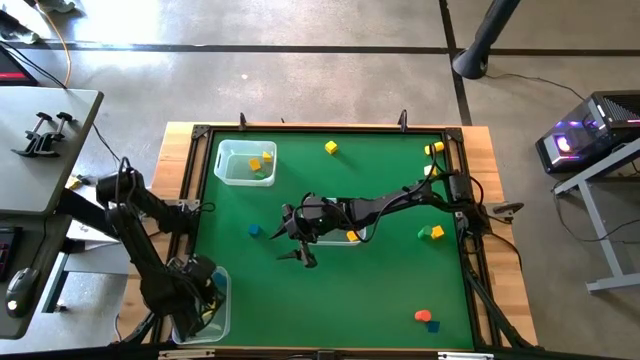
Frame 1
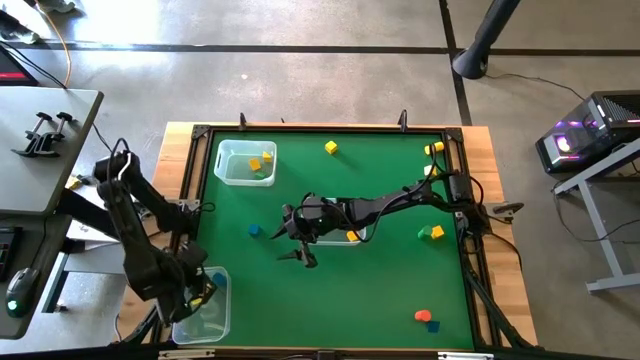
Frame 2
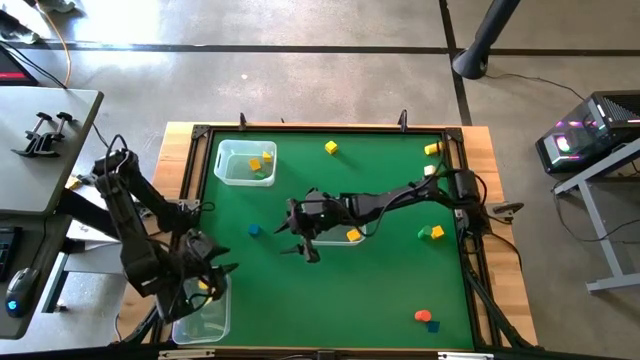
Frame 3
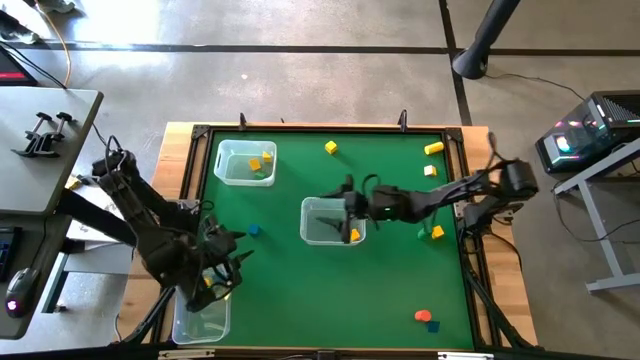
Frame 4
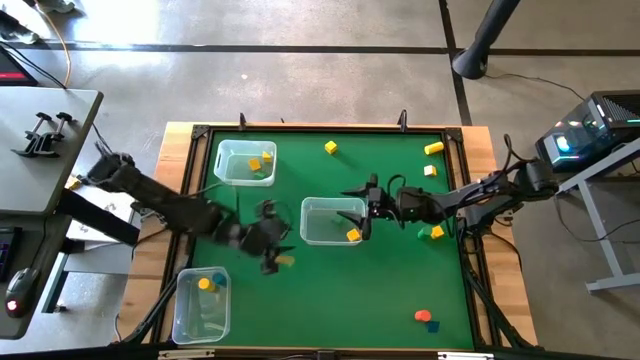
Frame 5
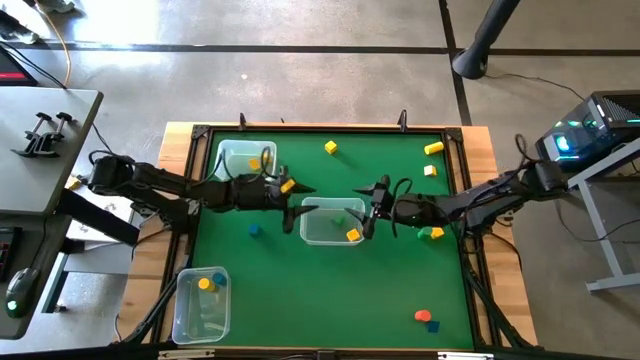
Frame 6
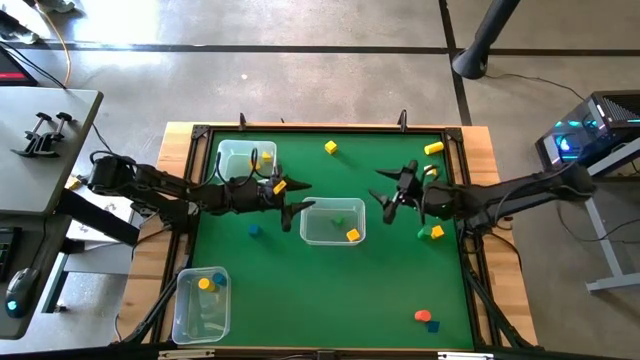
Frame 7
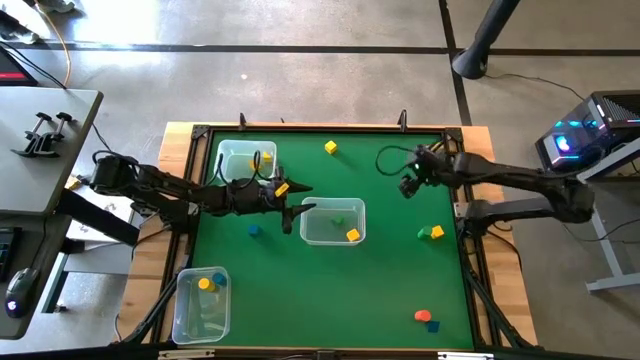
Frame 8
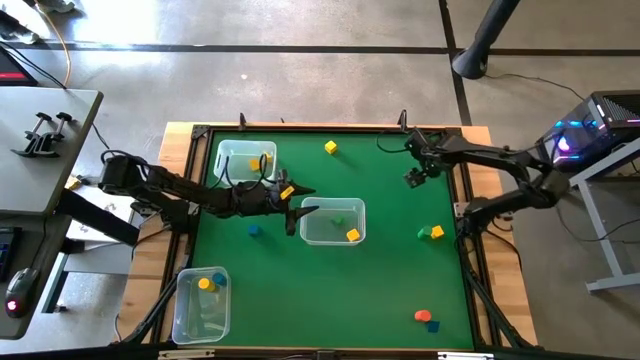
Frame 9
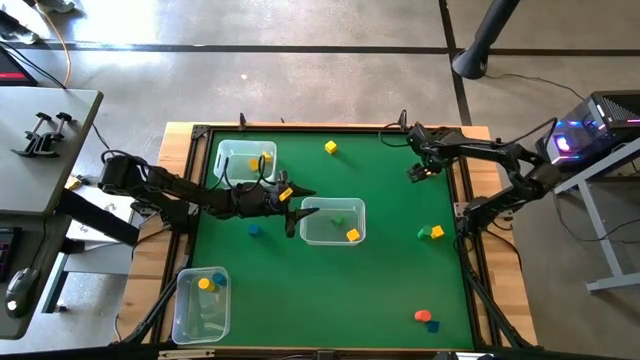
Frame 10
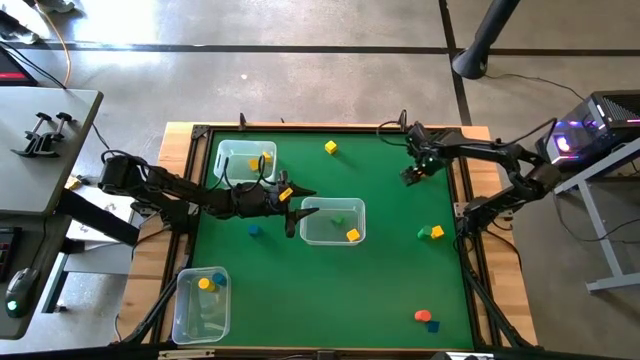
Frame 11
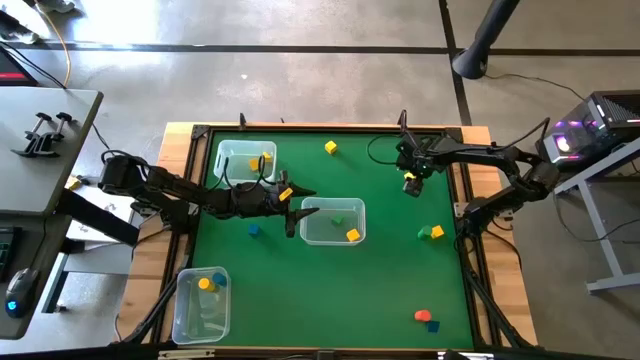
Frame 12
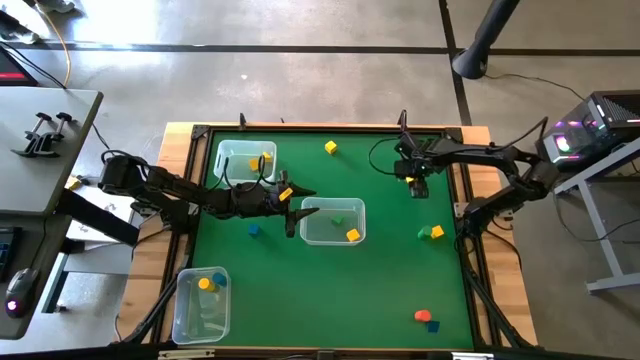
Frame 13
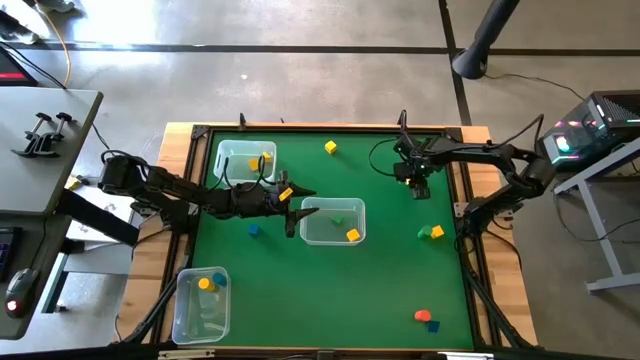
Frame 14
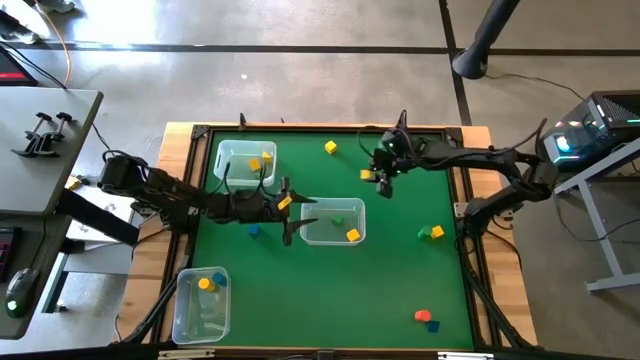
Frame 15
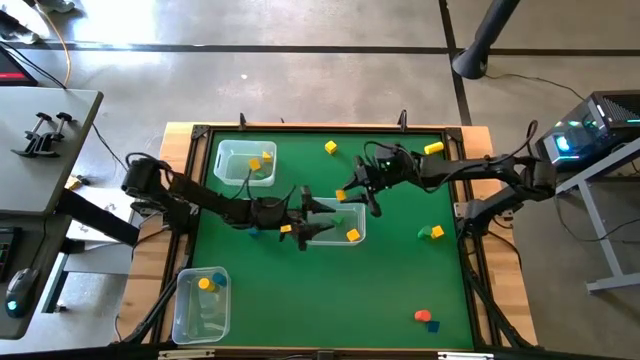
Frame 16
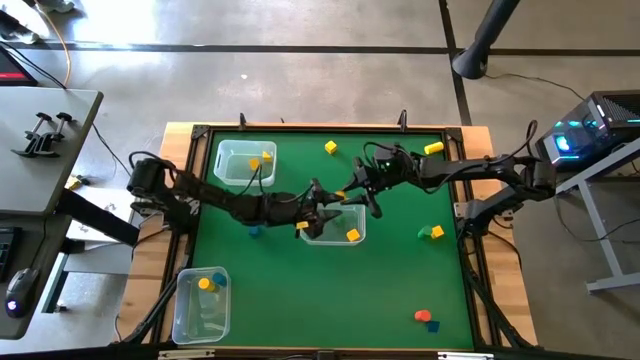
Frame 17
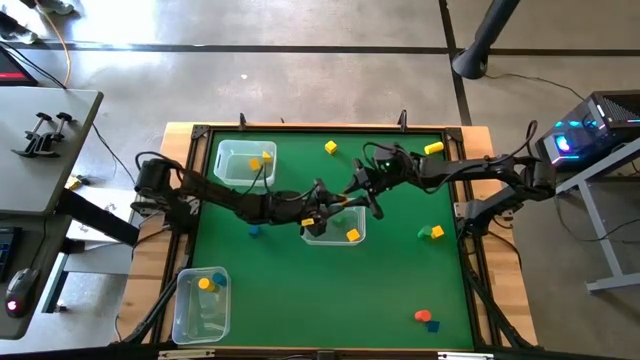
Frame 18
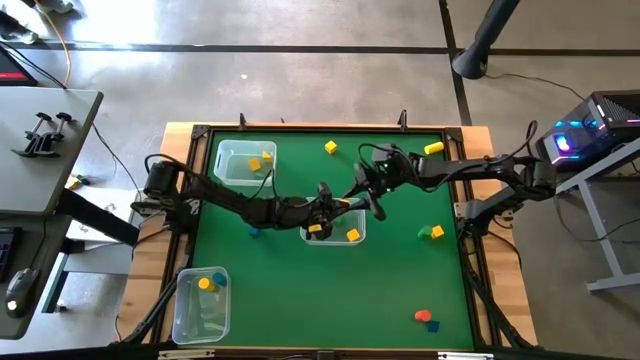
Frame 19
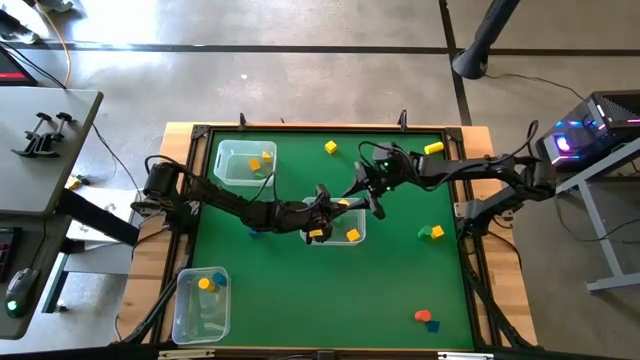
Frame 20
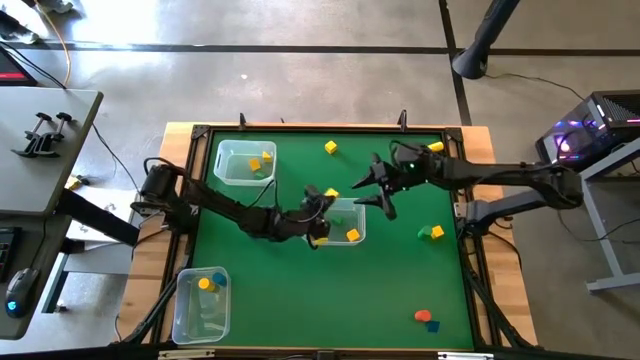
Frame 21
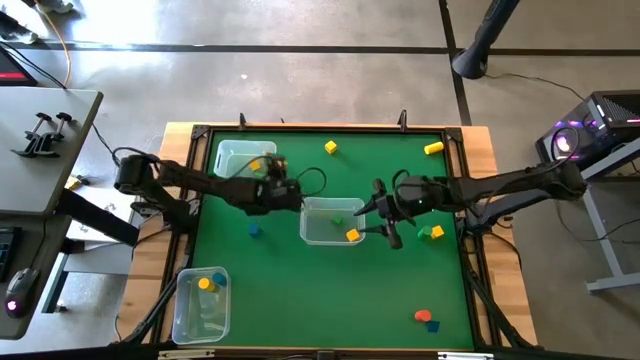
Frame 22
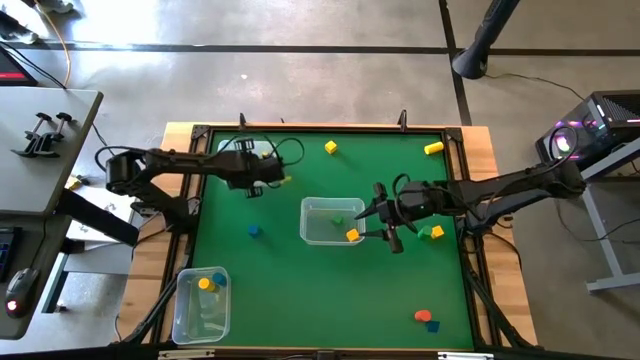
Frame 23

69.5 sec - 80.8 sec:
Task: Sort blocks by size
Put the yellow triangular block into the top left transparent bin

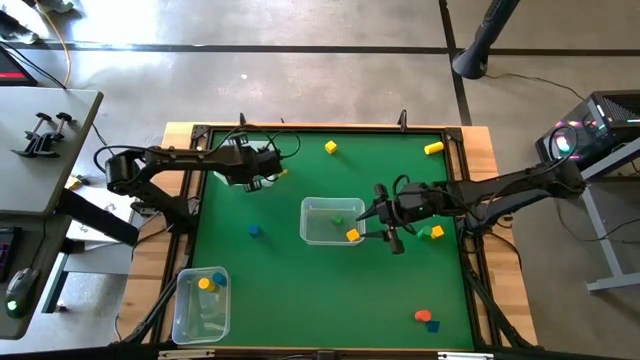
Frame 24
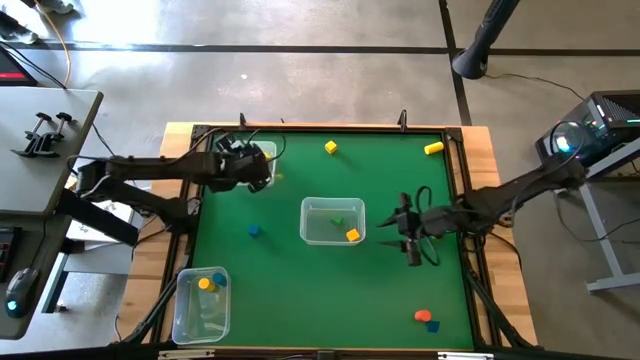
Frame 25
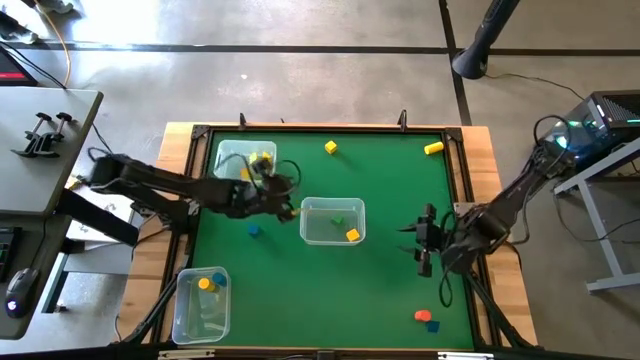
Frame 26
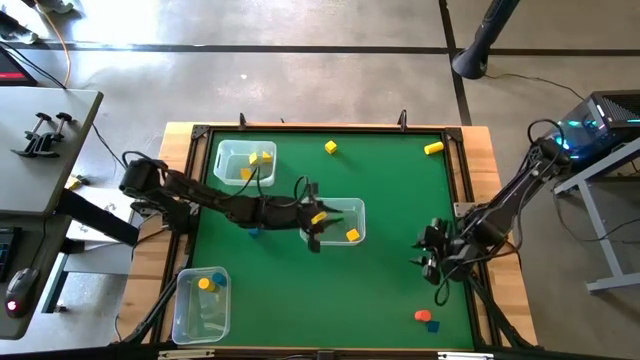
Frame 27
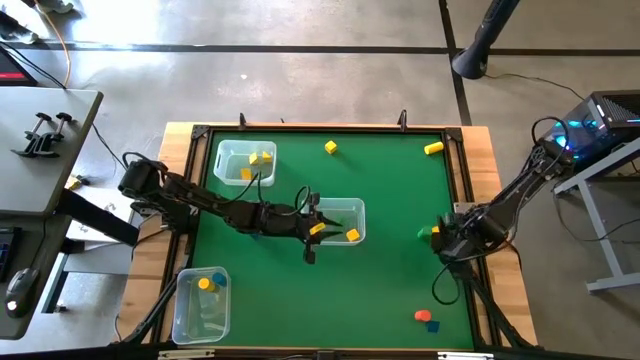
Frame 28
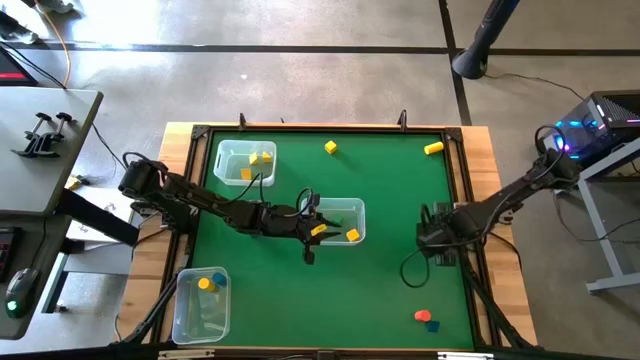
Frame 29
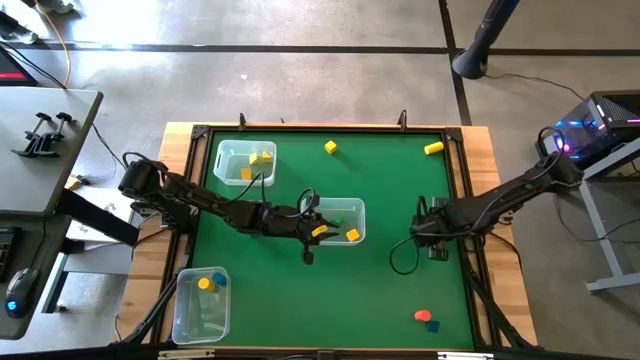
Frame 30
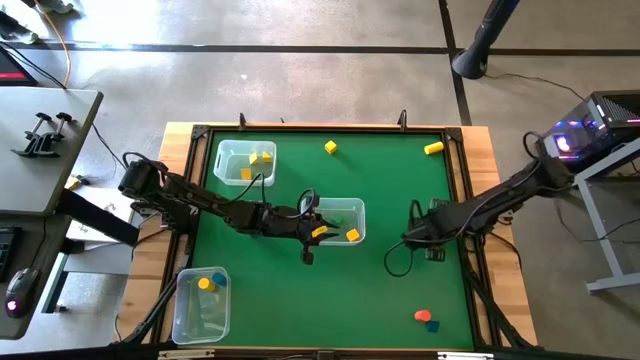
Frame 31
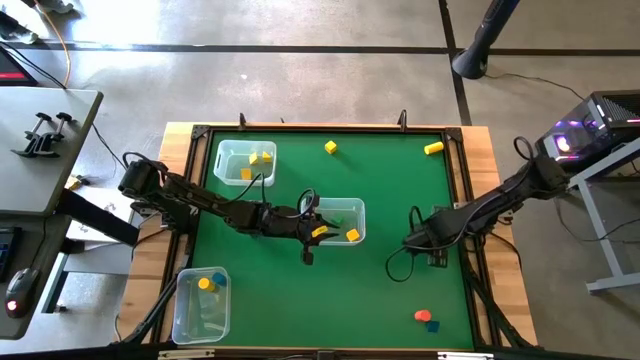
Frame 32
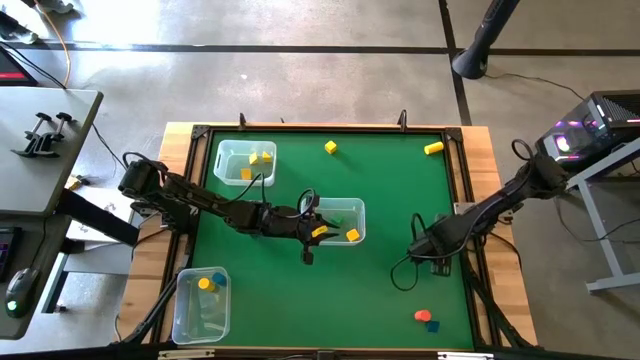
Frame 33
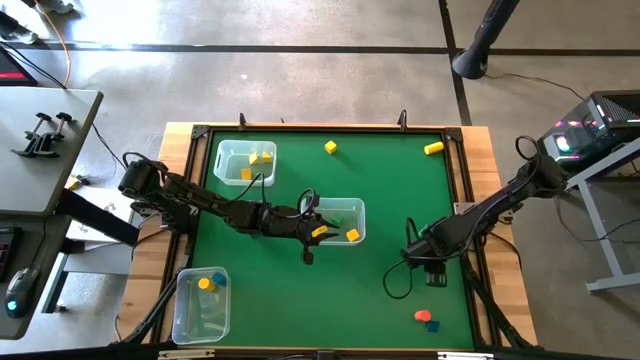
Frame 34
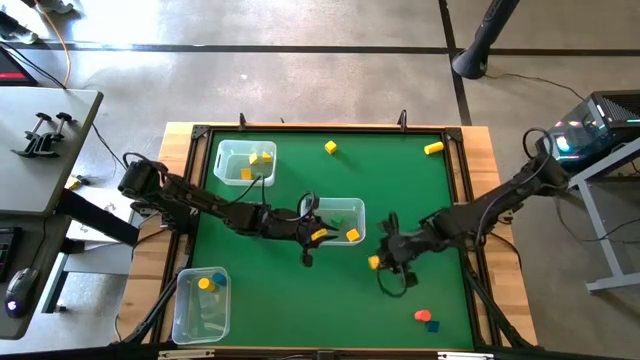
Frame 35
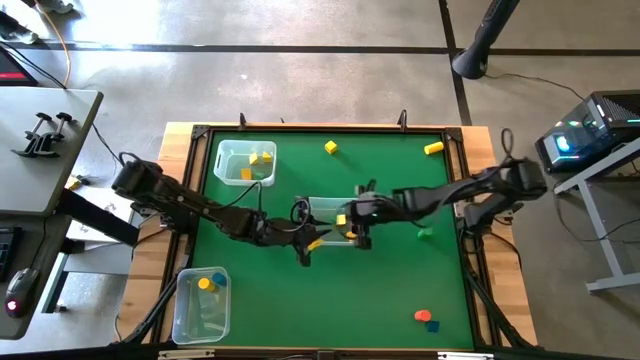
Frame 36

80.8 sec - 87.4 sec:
Put the yellow cube block into the middle right transparent bin

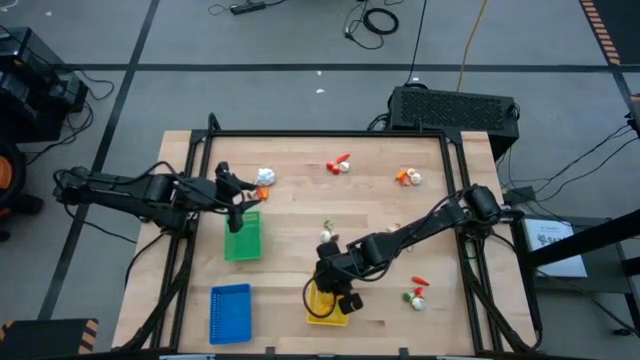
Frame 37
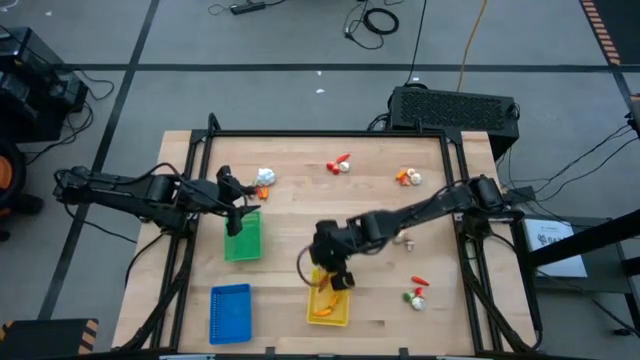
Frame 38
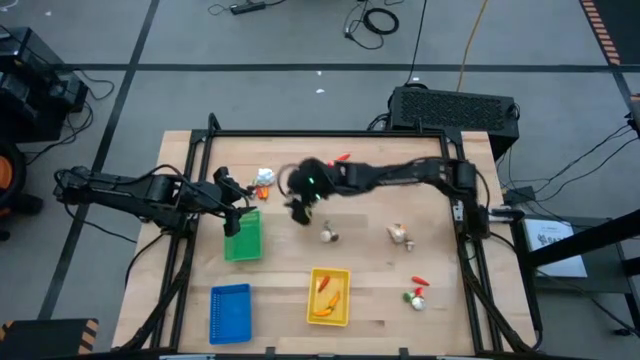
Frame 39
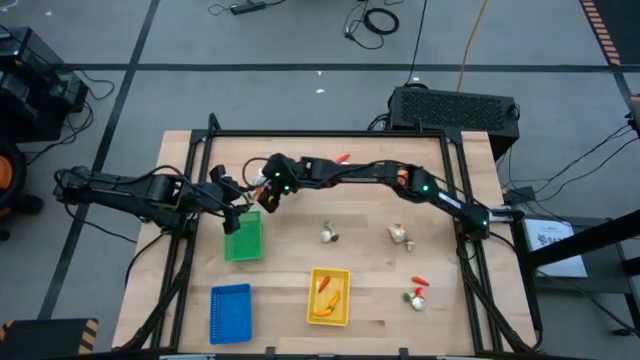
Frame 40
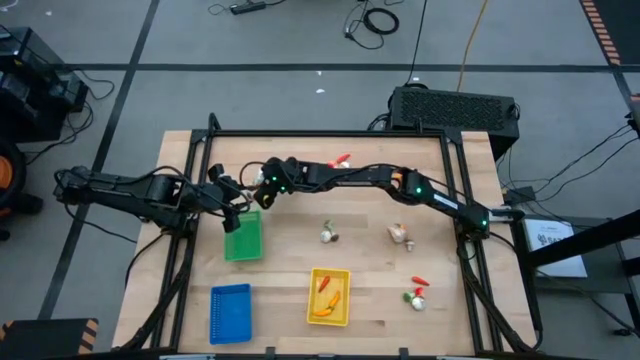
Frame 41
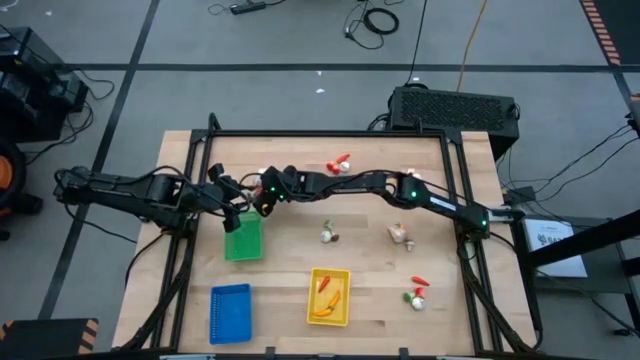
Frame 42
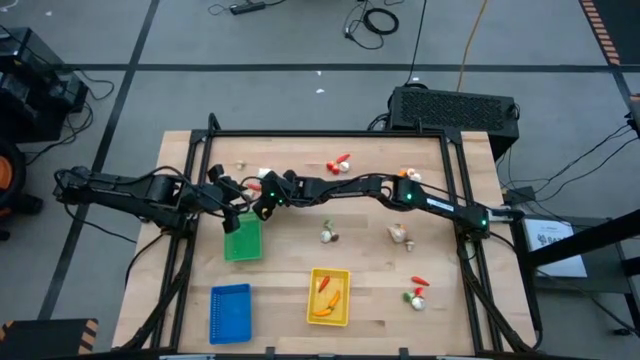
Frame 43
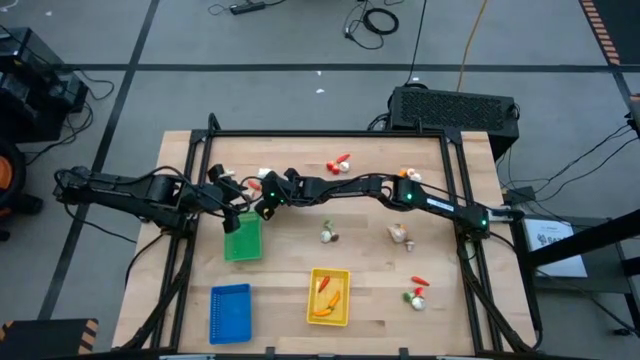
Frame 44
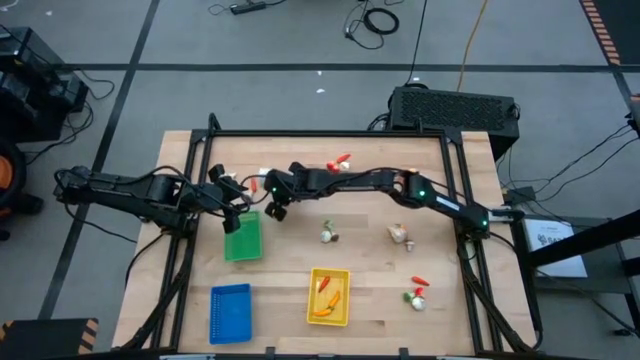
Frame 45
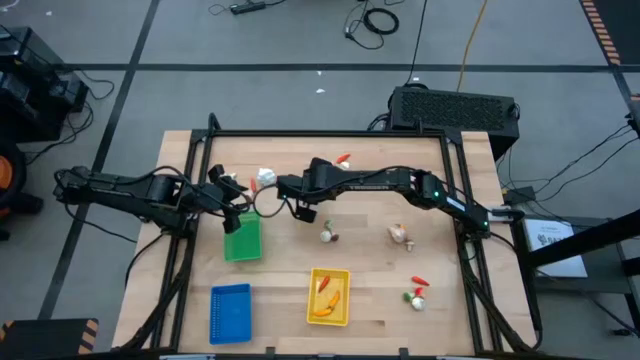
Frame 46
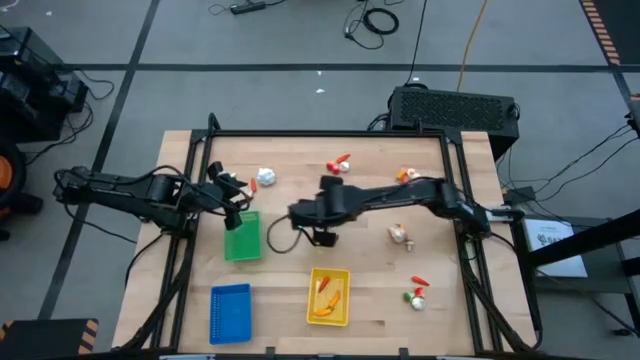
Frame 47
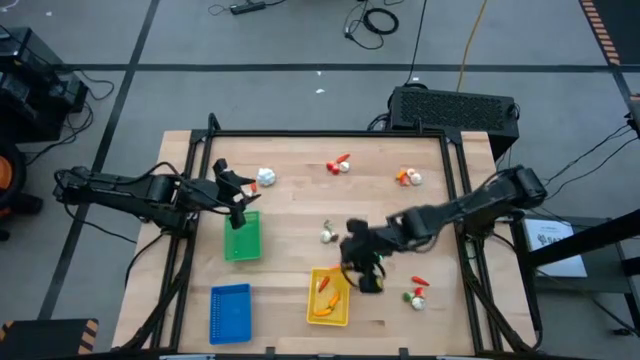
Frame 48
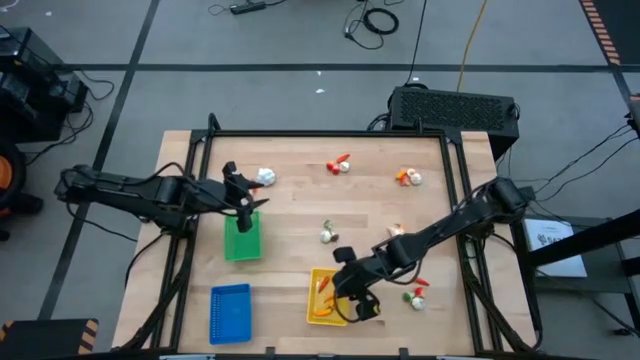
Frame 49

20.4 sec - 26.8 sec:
Task: Sort produce into baskets
Put the yellow chili pepper into the yellow basket
